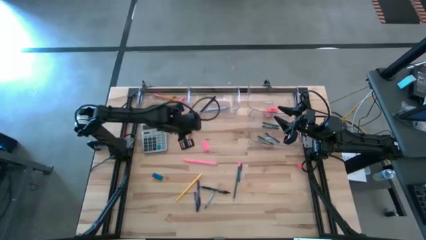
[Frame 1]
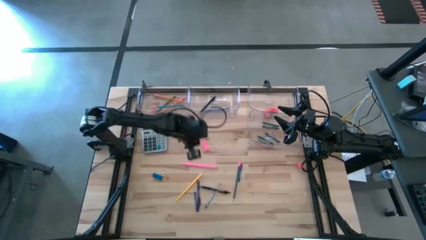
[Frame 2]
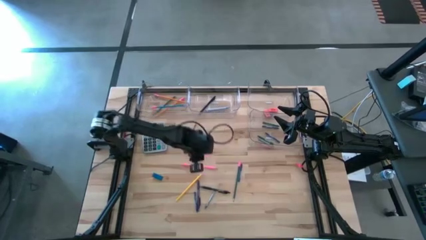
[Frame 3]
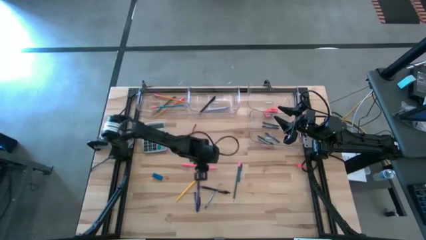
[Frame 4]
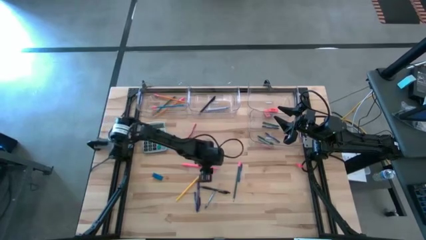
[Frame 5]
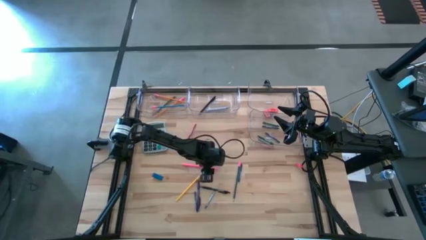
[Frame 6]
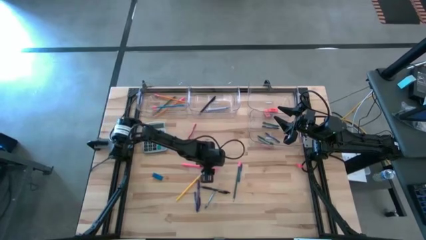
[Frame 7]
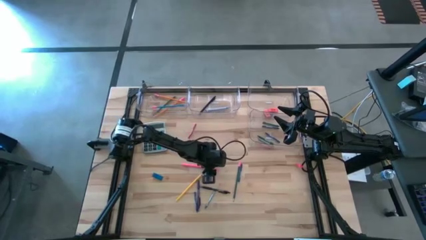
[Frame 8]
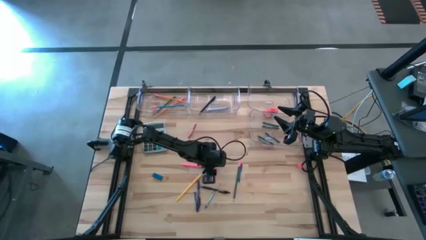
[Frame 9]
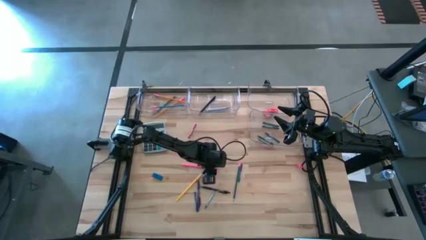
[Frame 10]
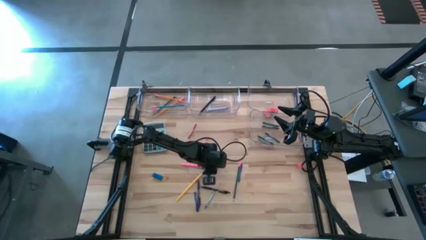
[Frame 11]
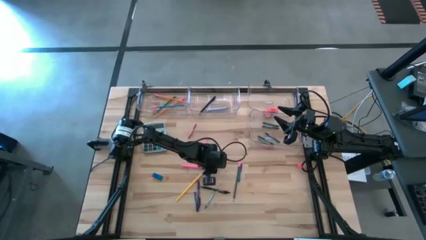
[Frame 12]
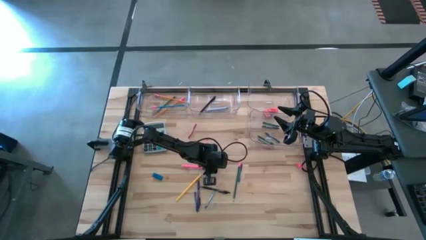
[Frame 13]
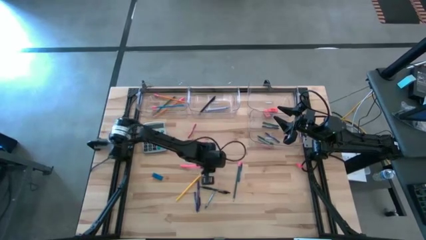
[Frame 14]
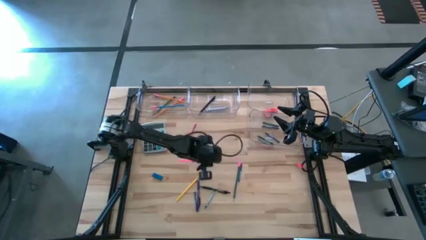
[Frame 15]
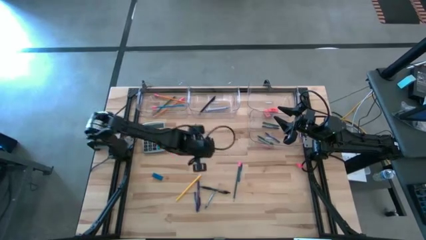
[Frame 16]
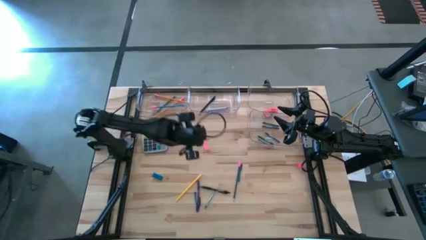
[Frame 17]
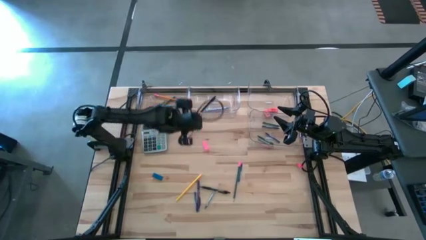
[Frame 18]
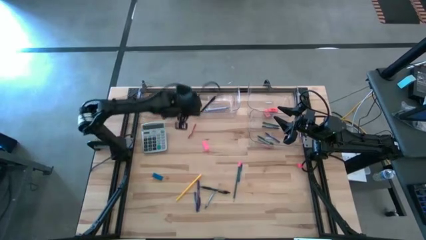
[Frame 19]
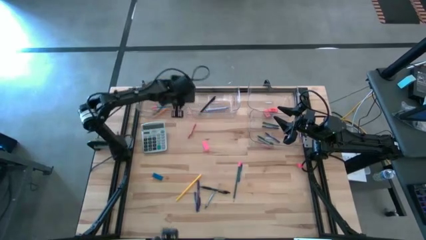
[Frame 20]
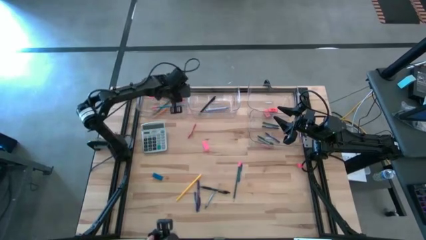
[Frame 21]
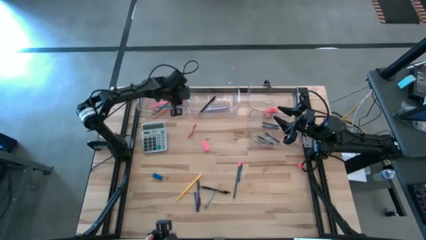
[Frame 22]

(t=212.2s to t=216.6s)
Task: Sort crayons/erasers/pens/pencils in bins
Put the pink pencil into the top left transparent bin

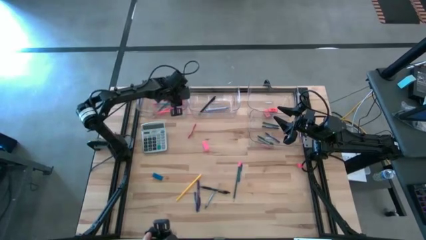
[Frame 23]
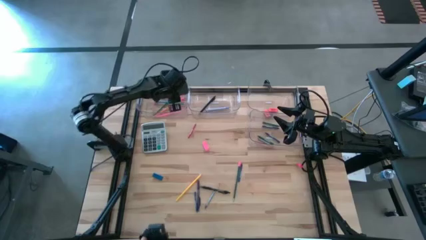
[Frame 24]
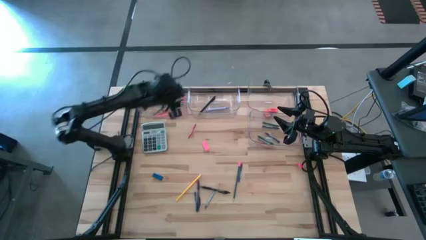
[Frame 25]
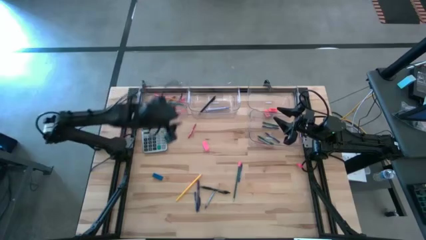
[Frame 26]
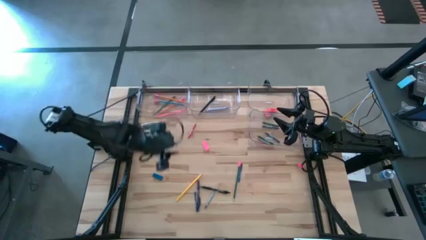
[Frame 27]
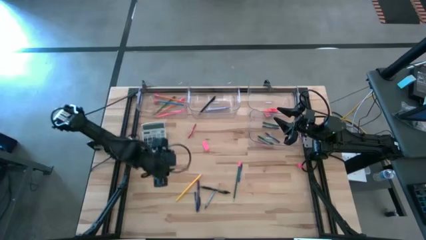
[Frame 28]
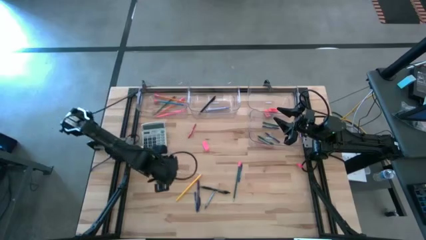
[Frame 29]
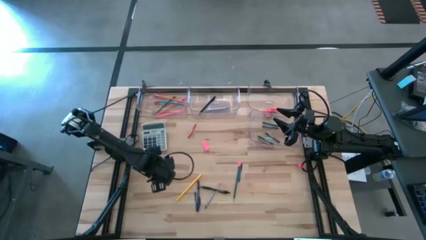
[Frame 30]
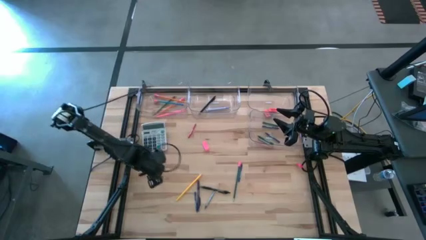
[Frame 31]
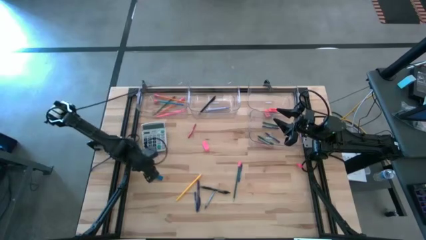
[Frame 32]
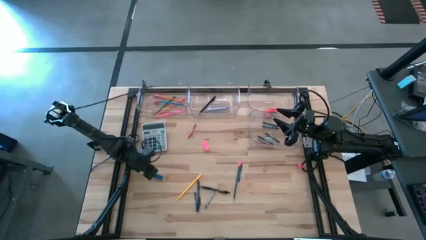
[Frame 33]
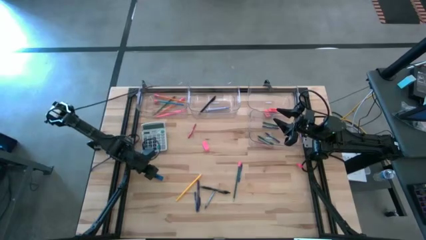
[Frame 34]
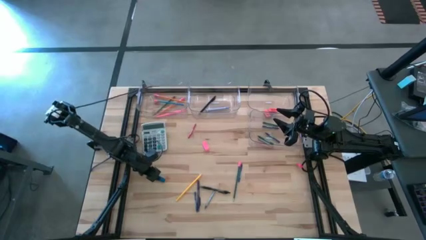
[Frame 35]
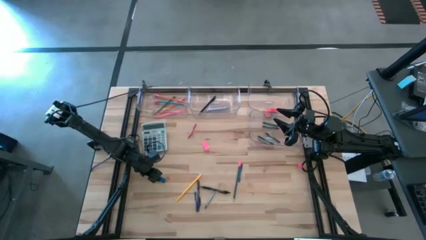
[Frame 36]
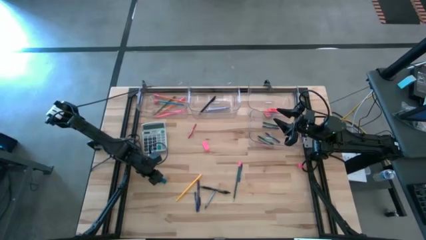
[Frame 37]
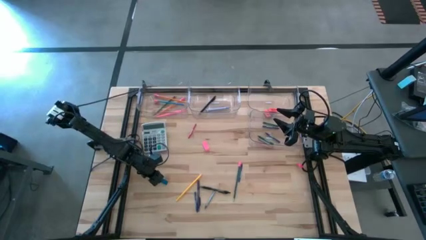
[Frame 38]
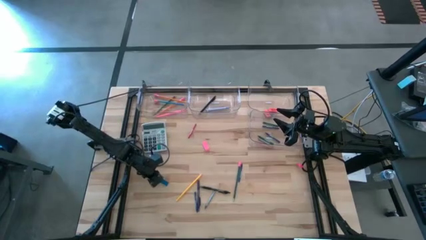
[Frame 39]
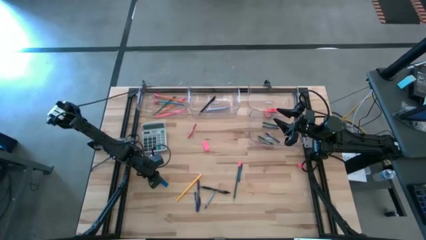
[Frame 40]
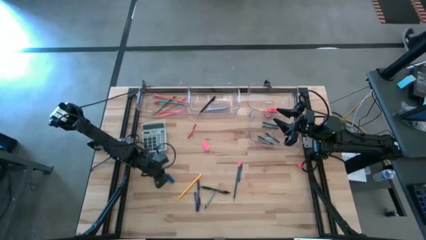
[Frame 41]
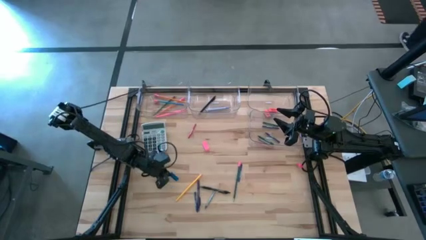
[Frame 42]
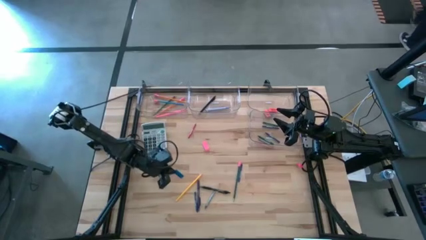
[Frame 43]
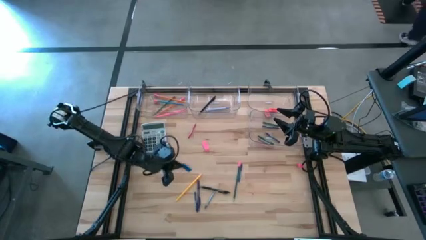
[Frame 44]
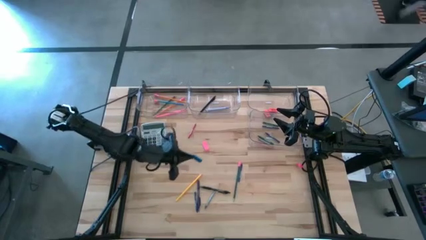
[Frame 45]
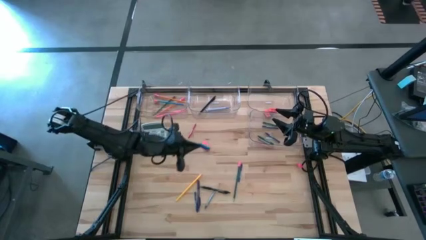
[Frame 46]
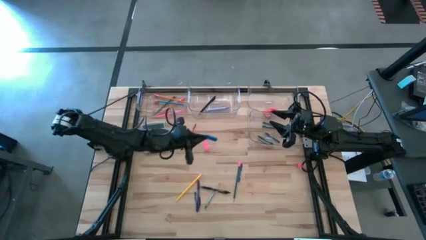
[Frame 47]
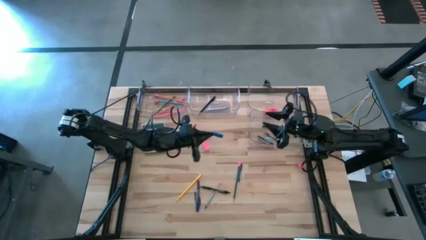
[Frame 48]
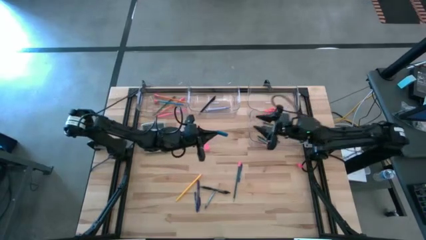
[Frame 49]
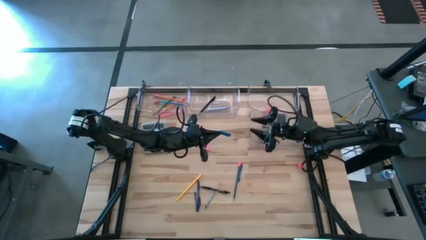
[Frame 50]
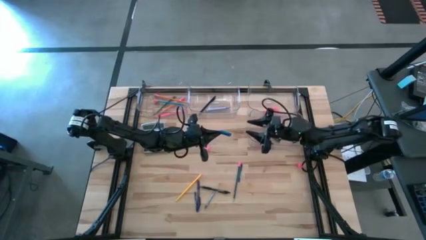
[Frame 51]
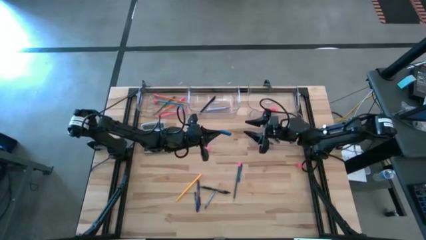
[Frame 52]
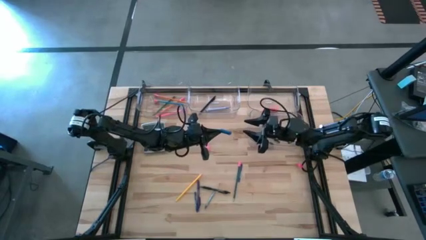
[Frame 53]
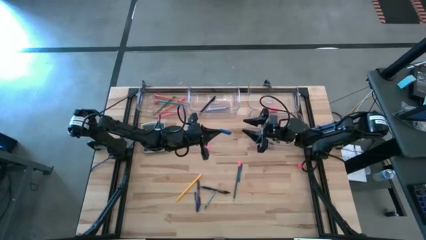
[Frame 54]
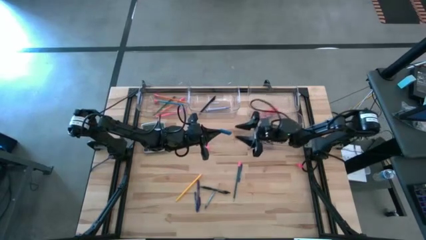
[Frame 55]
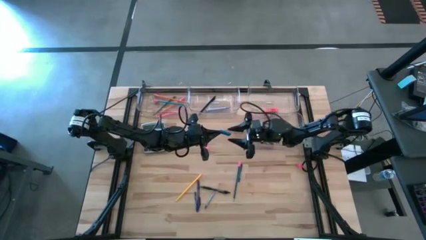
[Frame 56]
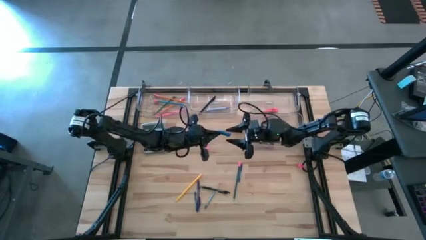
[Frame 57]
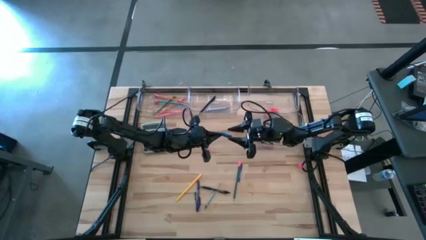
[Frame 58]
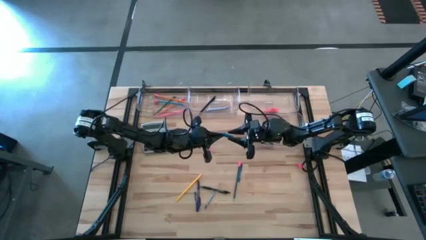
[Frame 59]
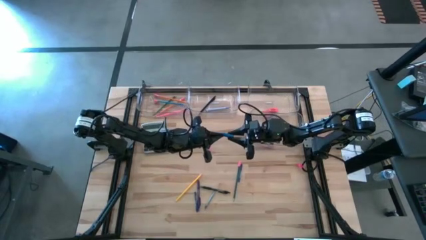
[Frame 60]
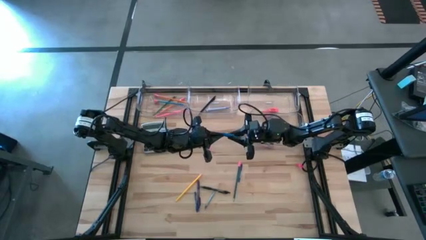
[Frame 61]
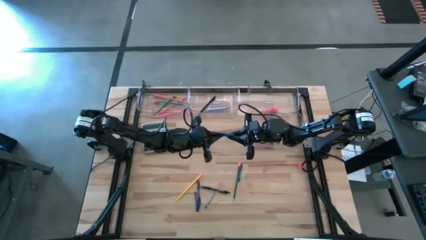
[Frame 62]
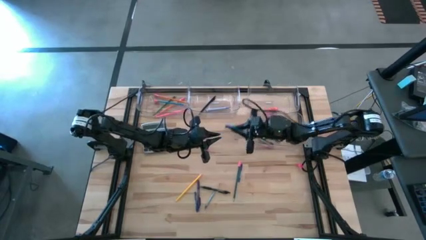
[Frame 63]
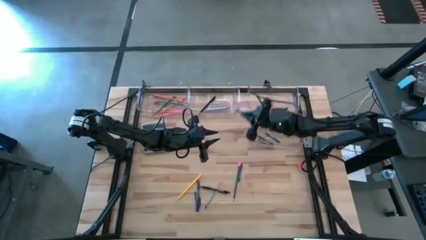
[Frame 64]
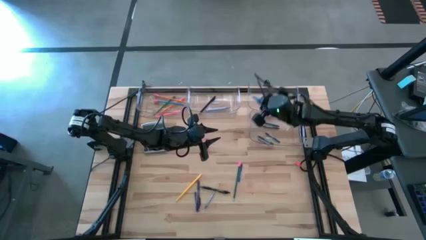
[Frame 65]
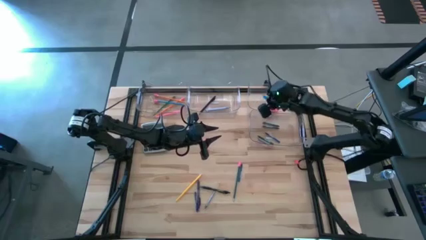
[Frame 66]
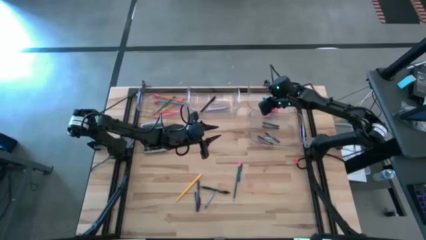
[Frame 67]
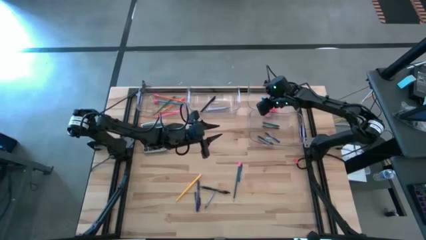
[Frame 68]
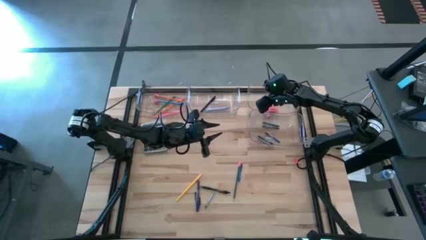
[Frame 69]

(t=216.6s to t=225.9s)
Put the blue eraser into the top right transparent bin

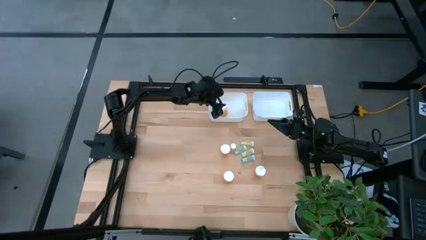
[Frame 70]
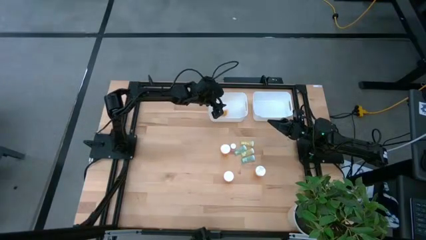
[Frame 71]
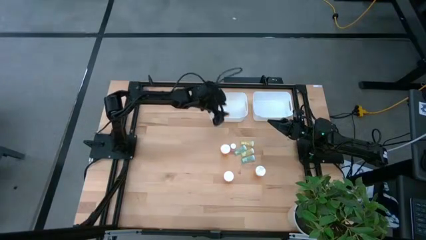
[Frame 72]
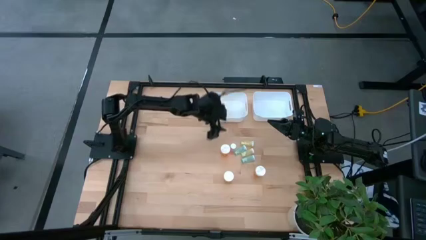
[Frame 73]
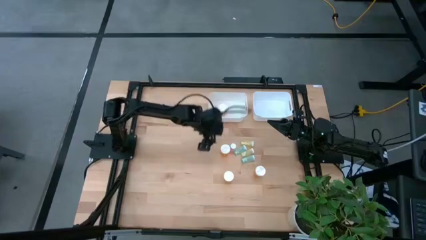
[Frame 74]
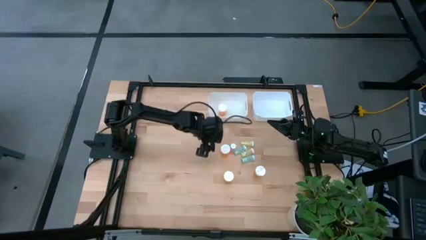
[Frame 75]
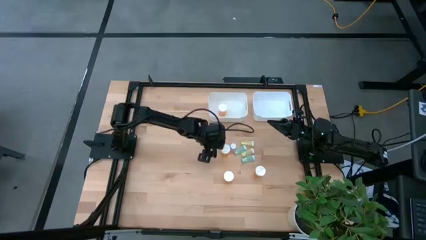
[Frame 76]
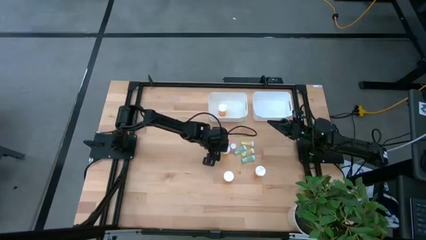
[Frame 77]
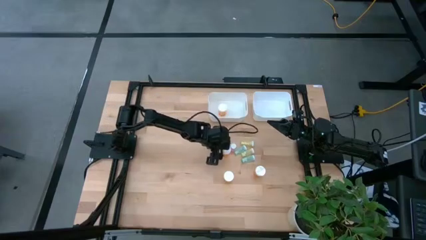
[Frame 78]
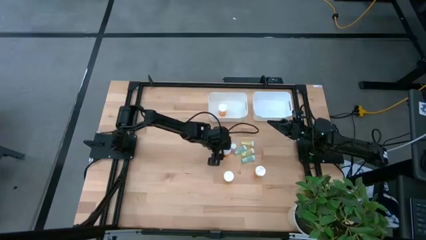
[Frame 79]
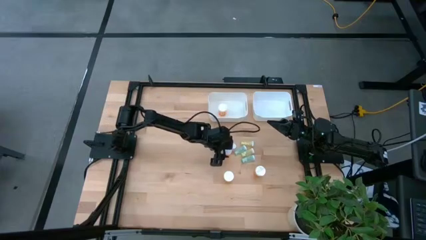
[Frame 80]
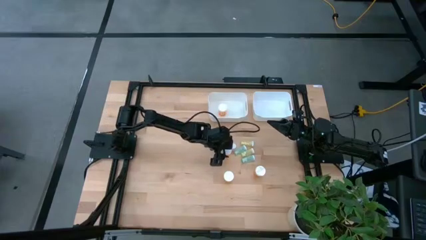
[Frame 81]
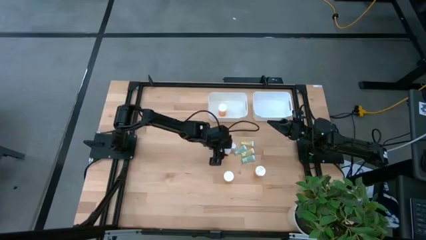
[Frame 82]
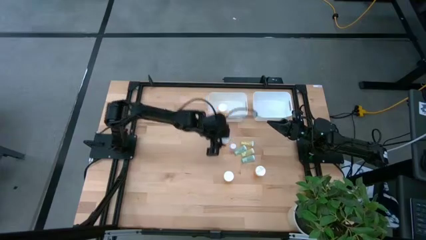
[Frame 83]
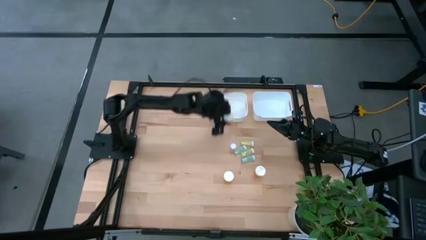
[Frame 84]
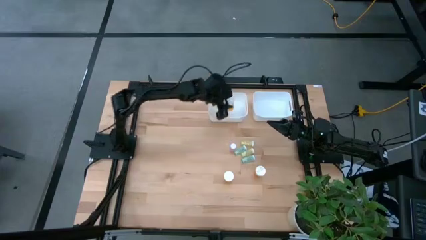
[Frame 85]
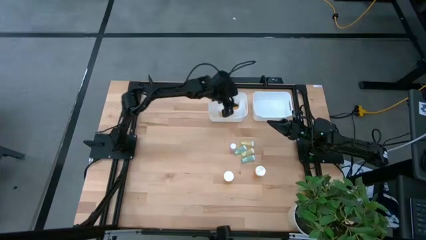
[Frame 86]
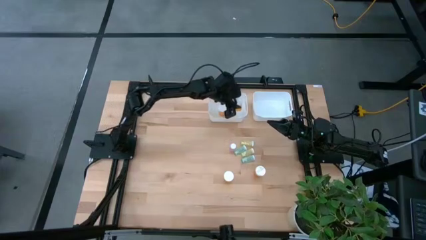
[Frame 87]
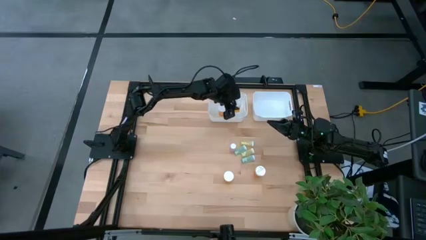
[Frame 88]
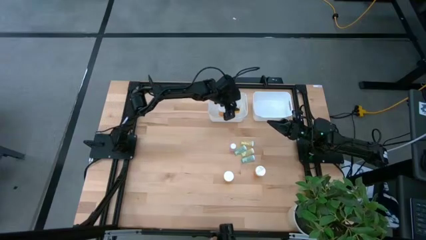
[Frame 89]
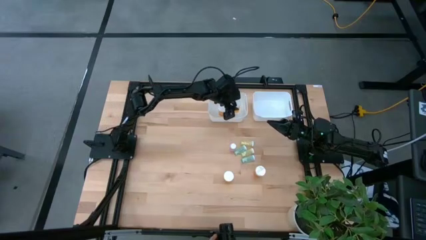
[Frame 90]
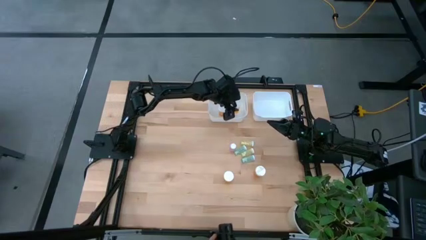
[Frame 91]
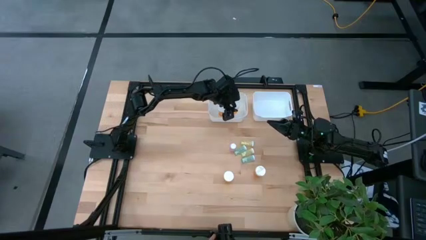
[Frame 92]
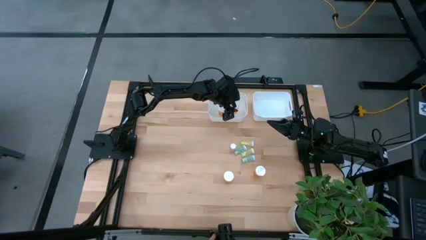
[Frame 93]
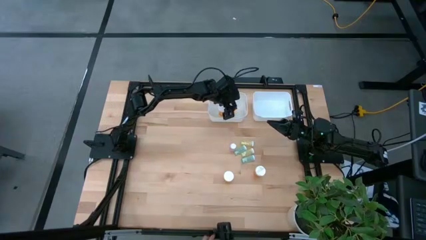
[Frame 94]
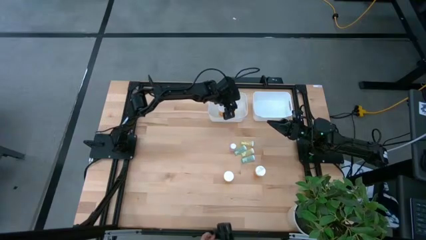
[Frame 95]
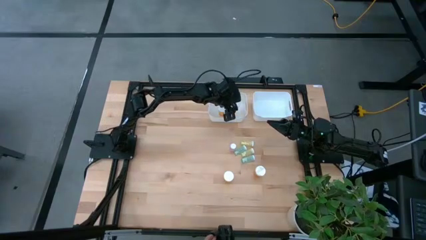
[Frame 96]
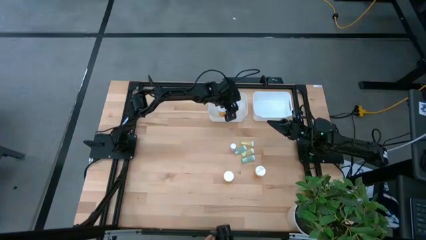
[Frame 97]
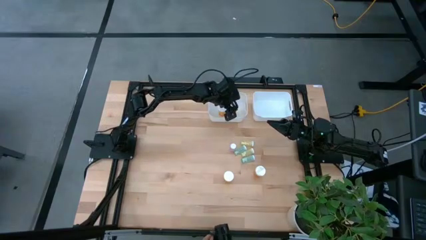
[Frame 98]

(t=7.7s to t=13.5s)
Task: Pick and place medicine bottles into bin by pill shape (circle, oval)
Put the orange capsule bottle into the left white bin
